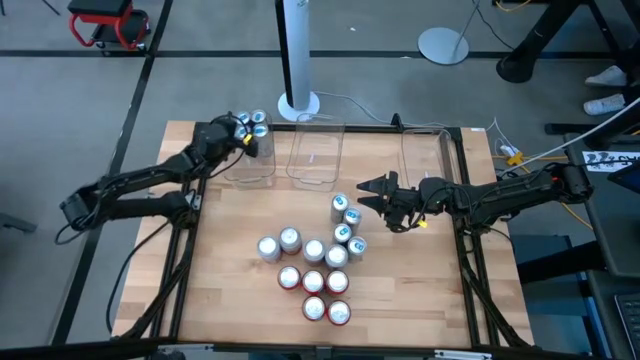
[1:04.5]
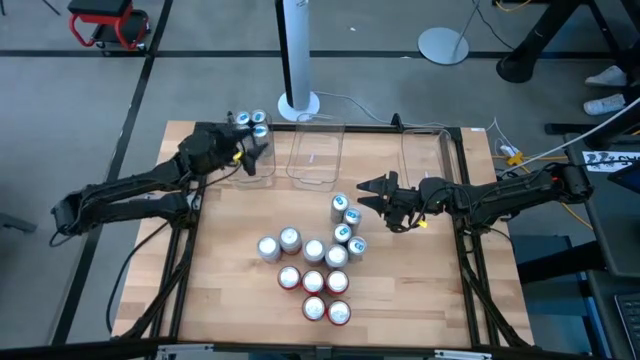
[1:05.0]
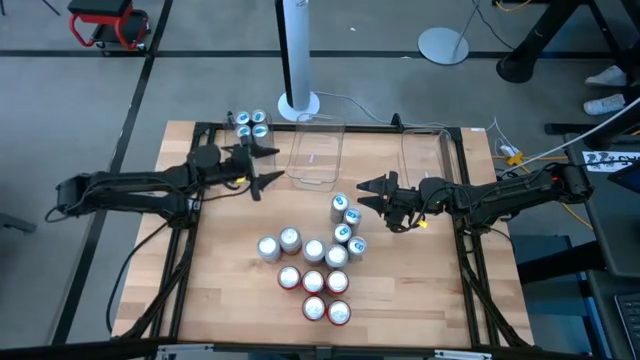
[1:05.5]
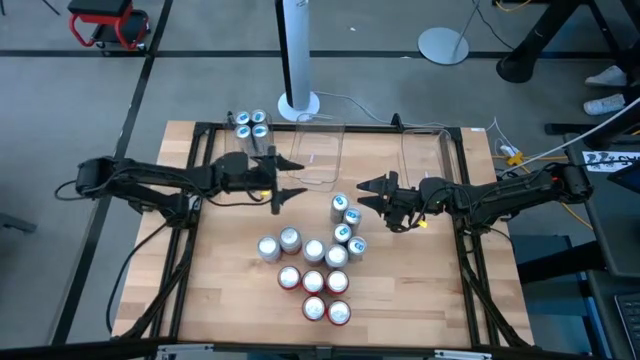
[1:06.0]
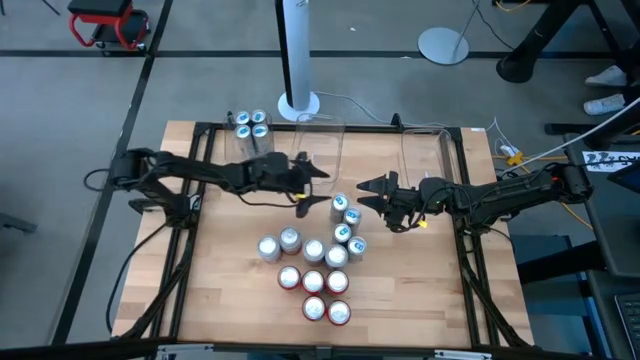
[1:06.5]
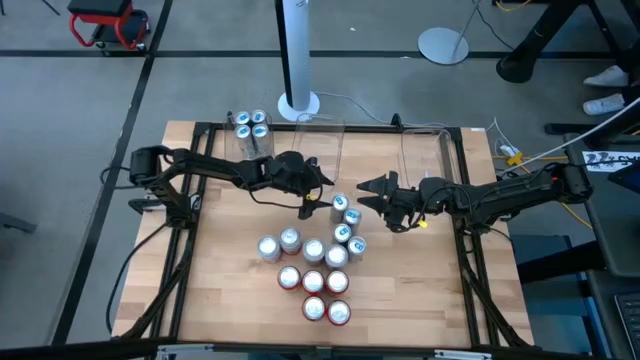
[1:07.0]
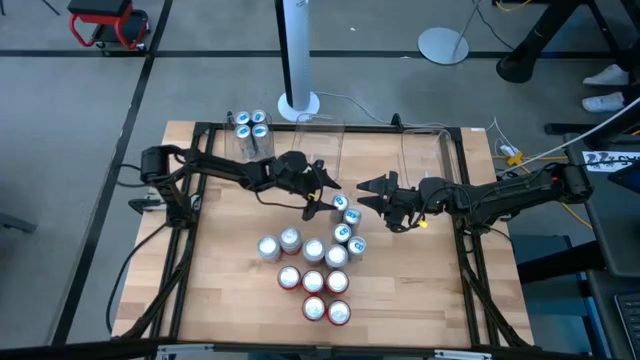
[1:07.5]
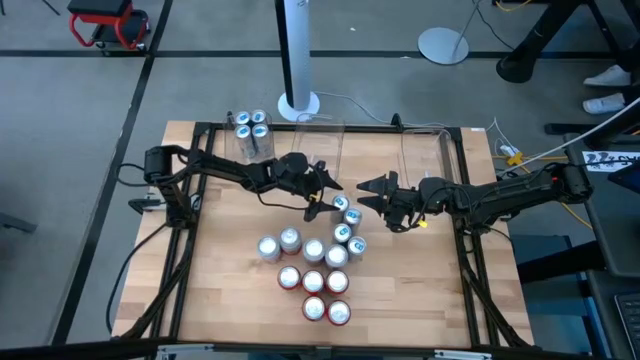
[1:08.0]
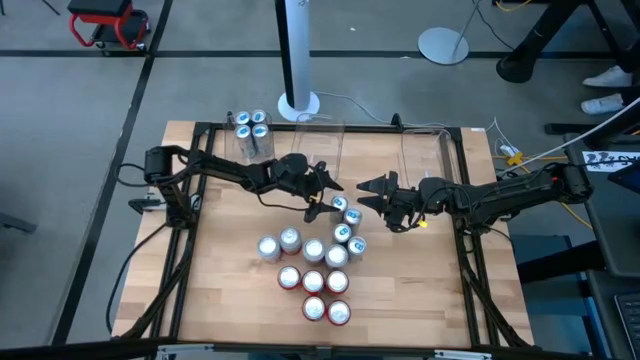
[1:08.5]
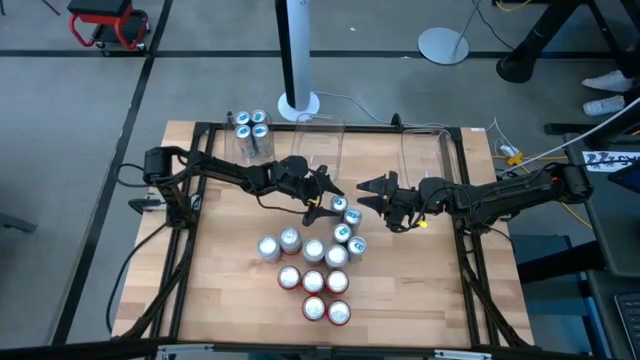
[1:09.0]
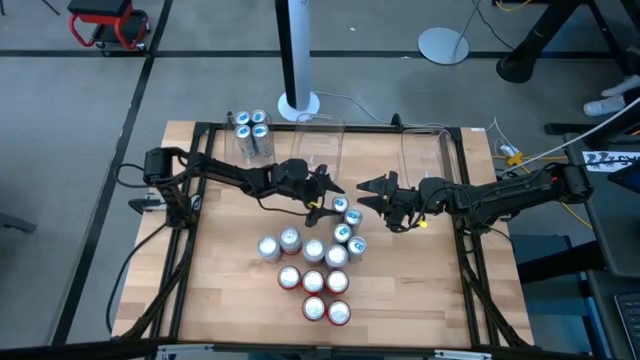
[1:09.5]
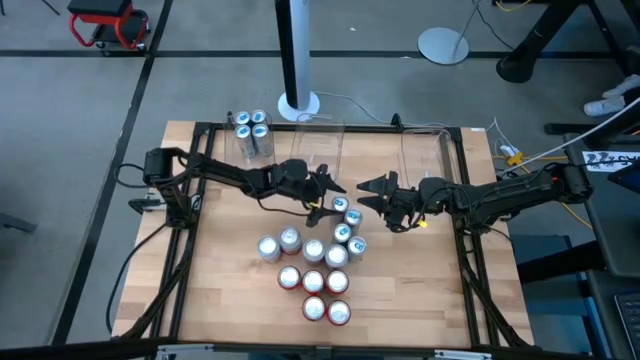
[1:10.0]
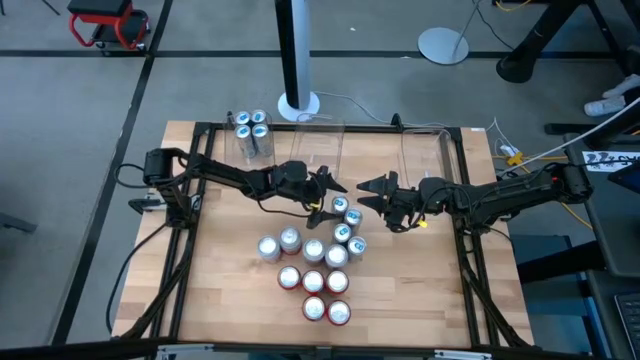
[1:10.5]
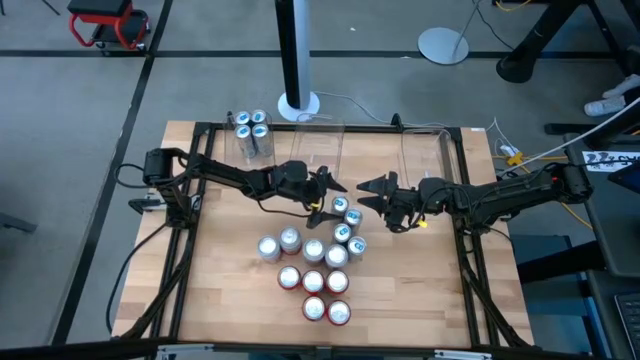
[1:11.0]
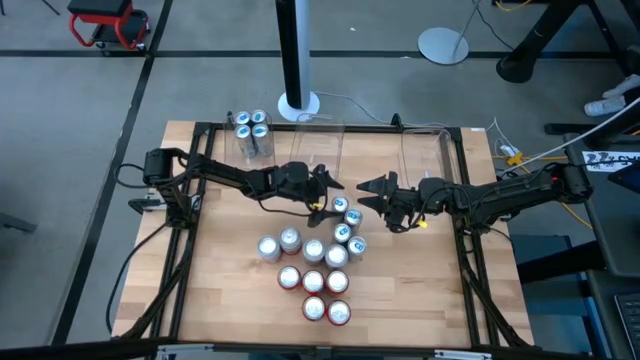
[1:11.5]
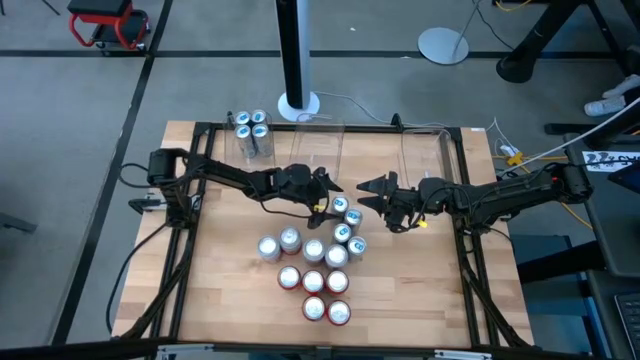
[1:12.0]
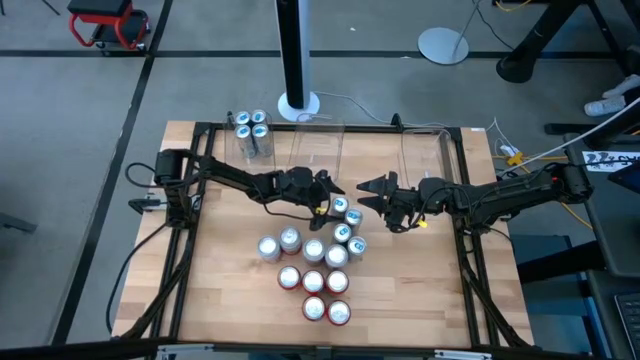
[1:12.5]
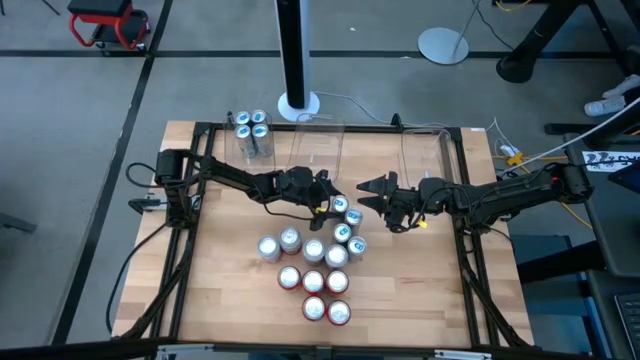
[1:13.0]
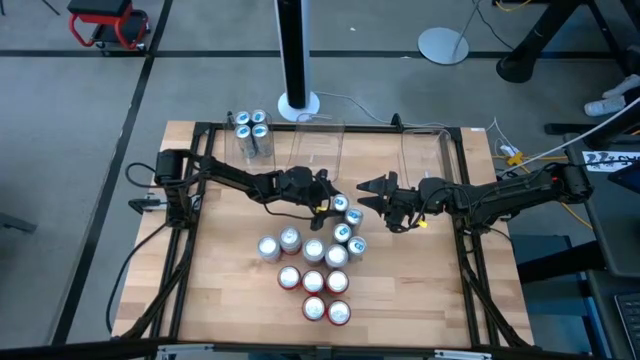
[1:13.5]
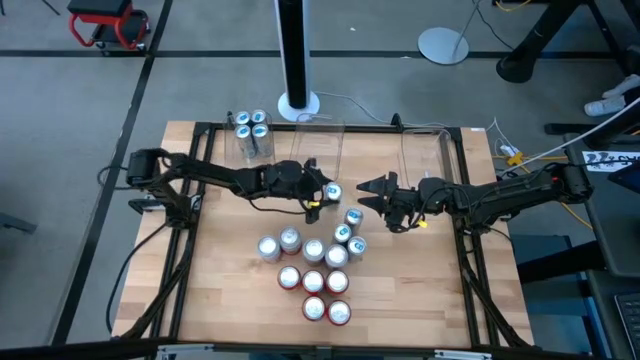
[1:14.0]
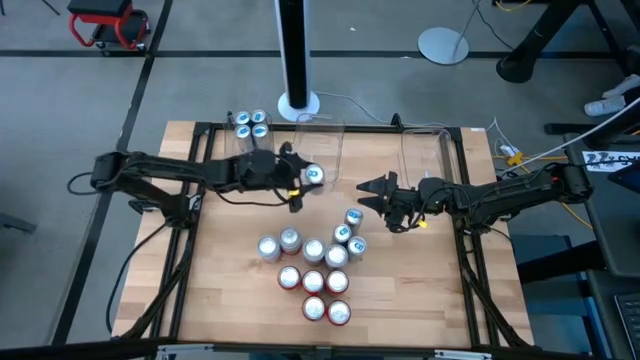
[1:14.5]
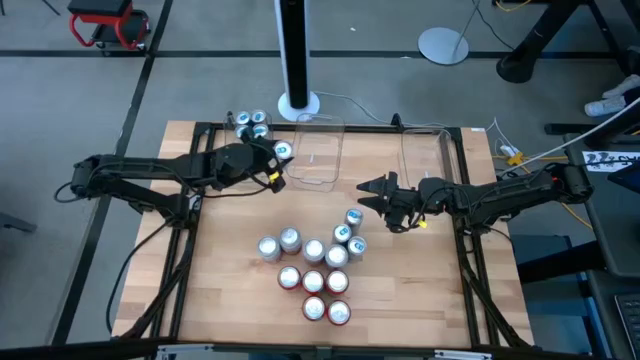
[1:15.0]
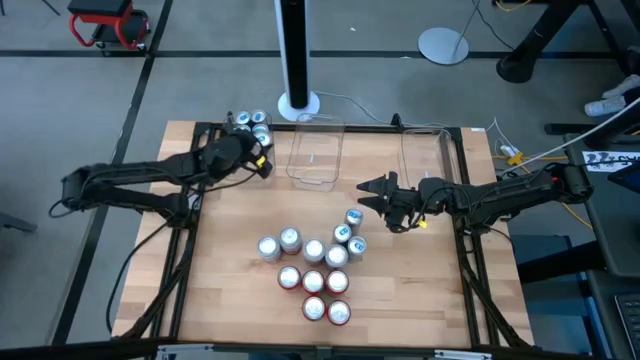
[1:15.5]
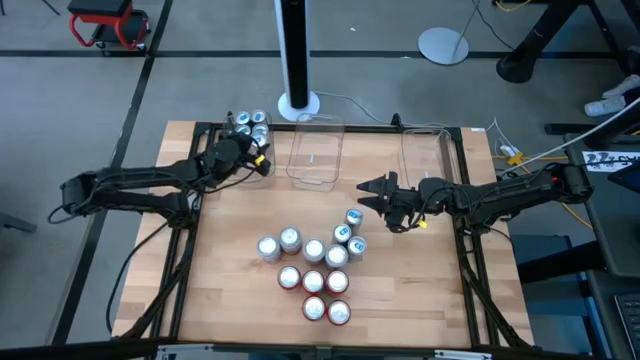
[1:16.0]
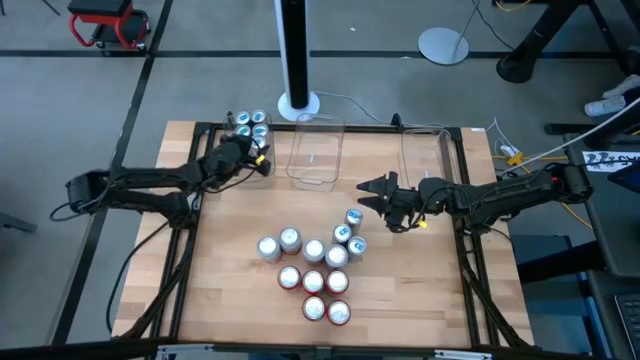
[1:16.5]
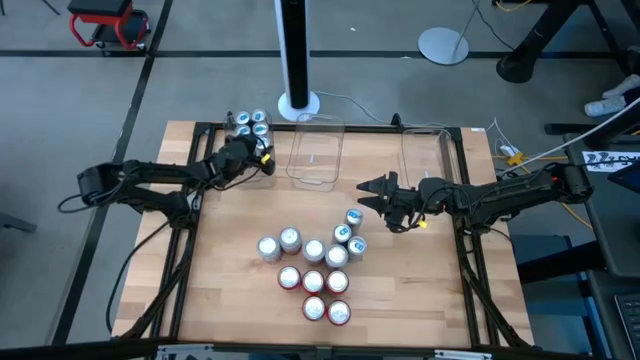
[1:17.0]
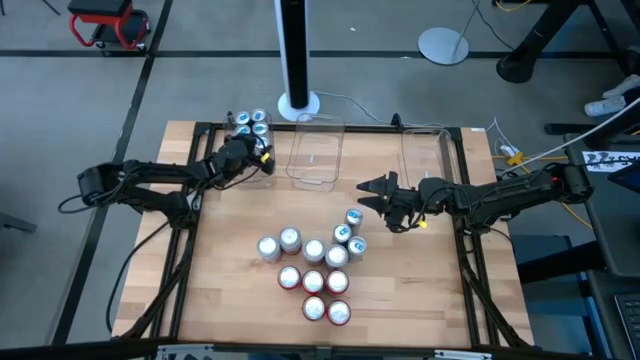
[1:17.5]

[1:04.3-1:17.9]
Task: Sort soda cans
Put the blue soda can into the left transparent bin

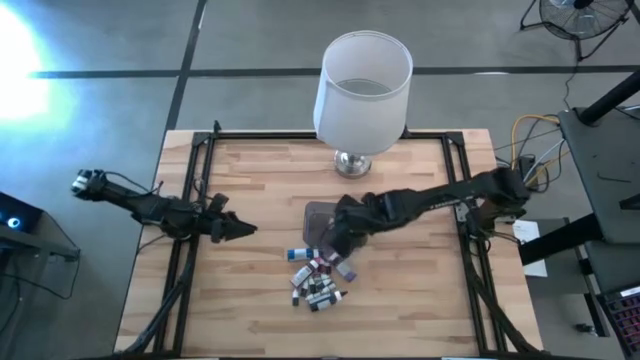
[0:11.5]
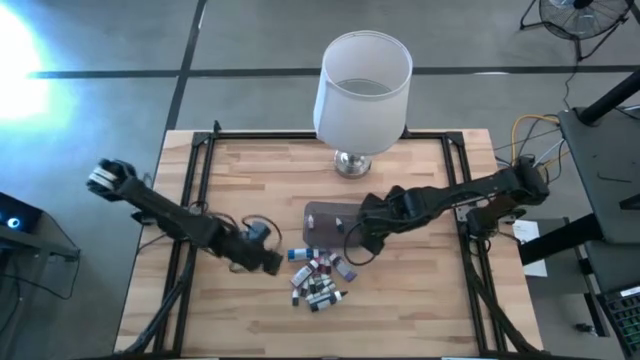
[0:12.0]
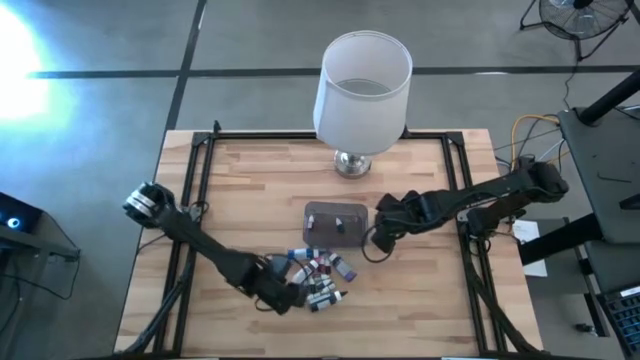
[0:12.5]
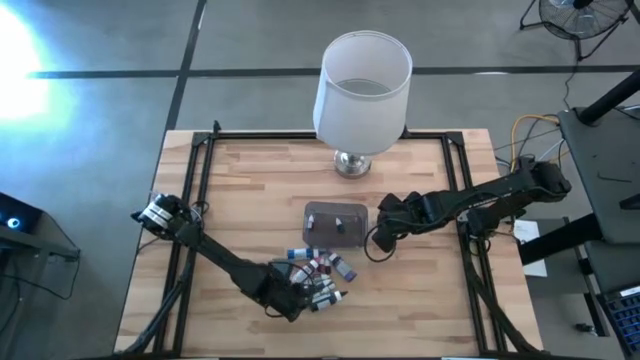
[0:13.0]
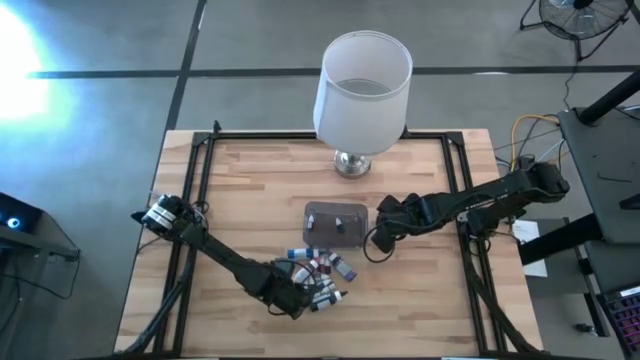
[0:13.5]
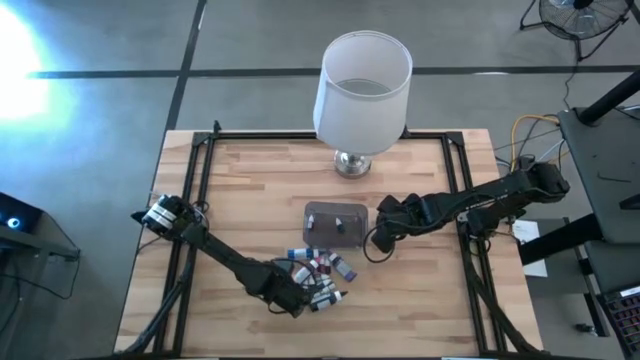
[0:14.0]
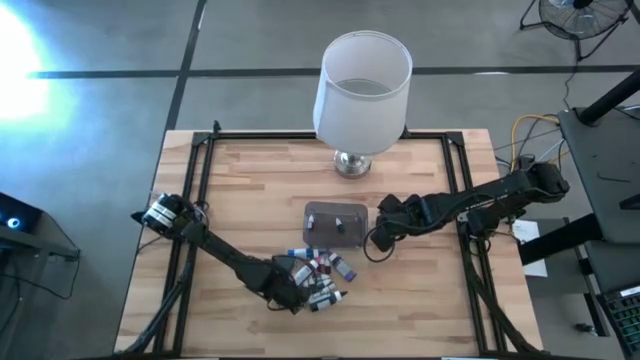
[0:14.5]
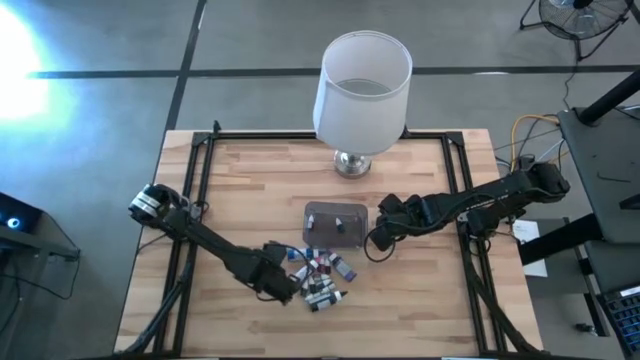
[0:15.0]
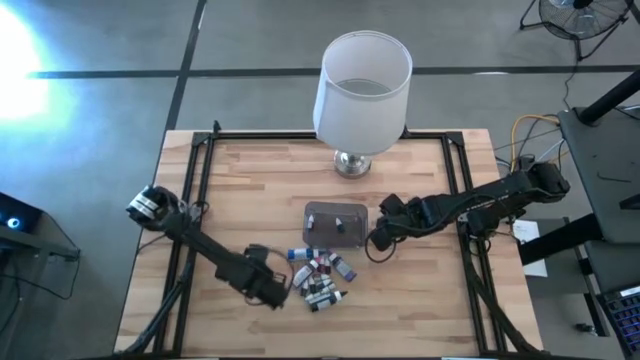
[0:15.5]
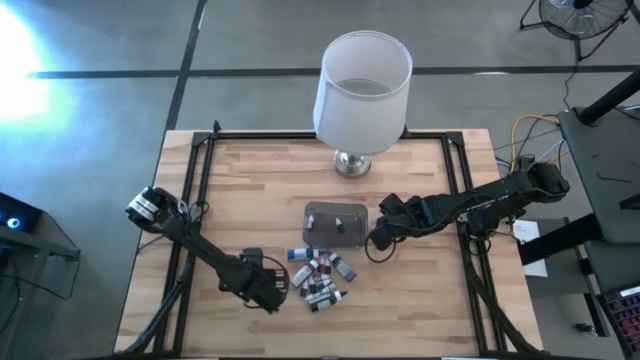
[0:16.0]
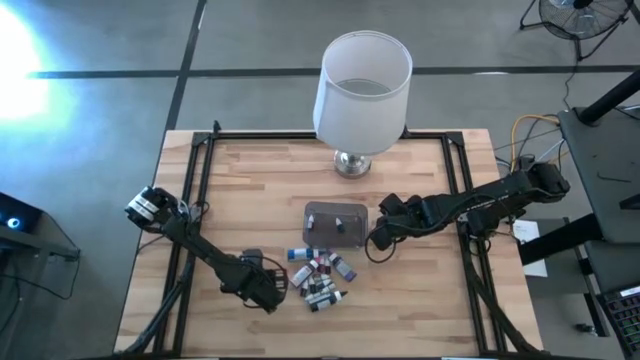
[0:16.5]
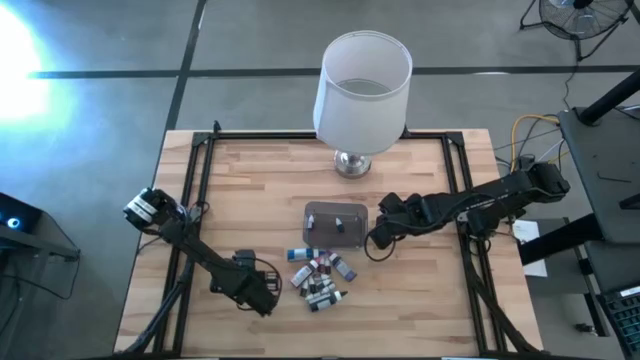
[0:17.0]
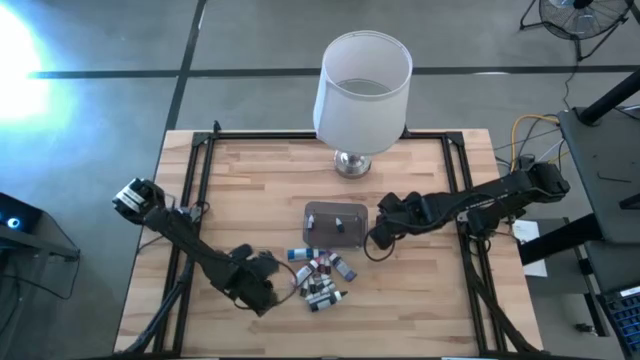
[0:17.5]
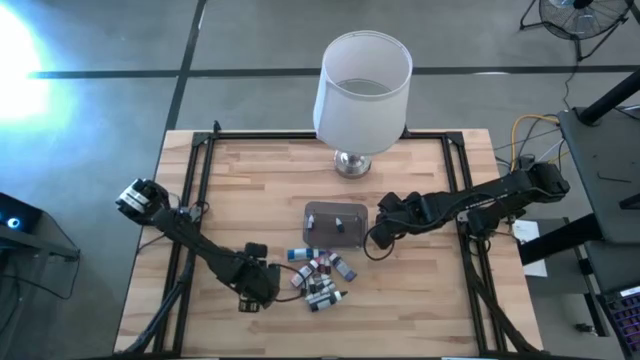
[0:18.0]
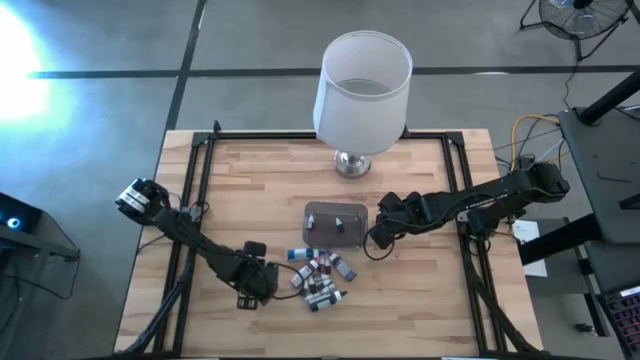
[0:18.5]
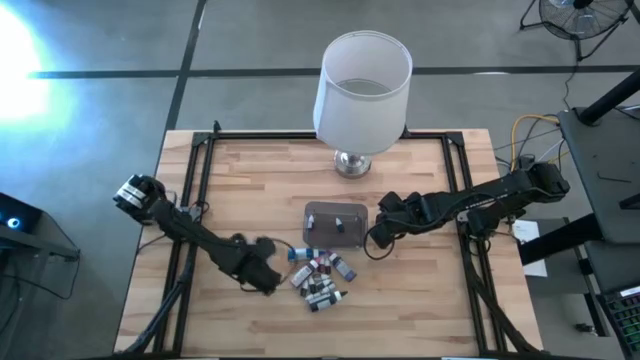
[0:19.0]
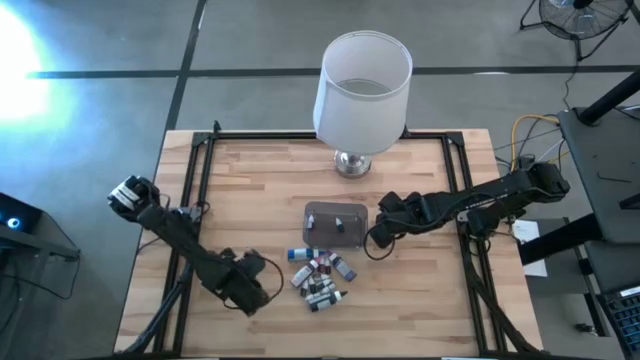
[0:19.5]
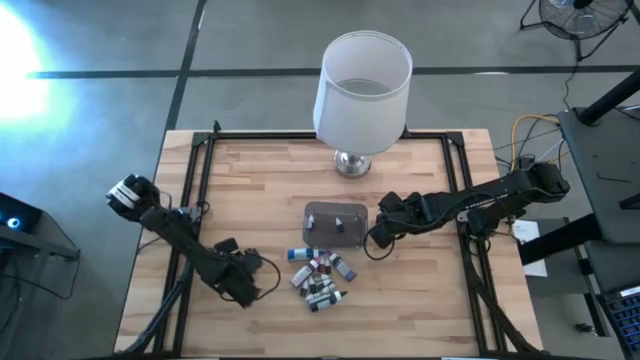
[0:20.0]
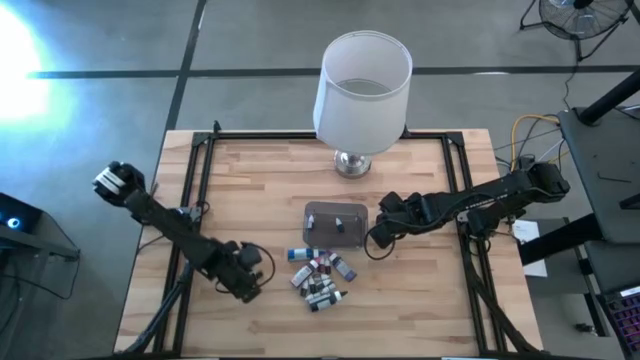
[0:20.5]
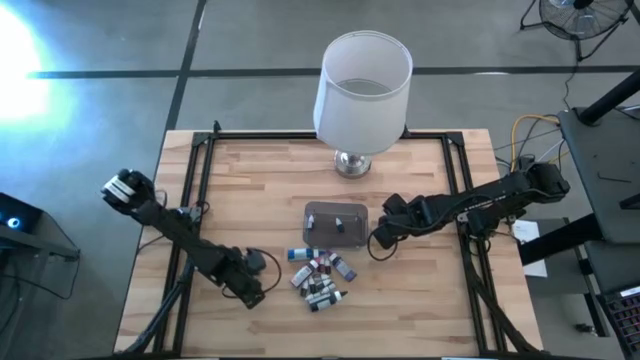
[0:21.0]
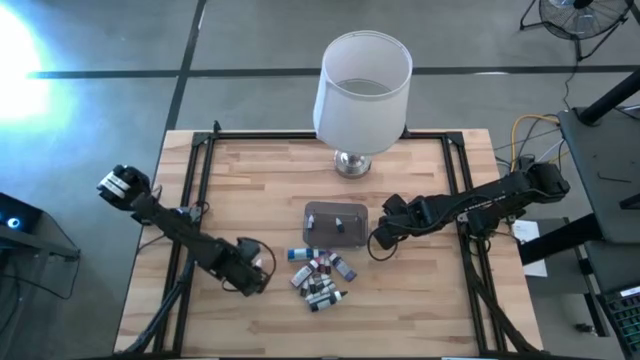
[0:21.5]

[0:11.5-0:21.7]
Task: Pick & Place food coloring
Put the small black food coloring into the black bin
